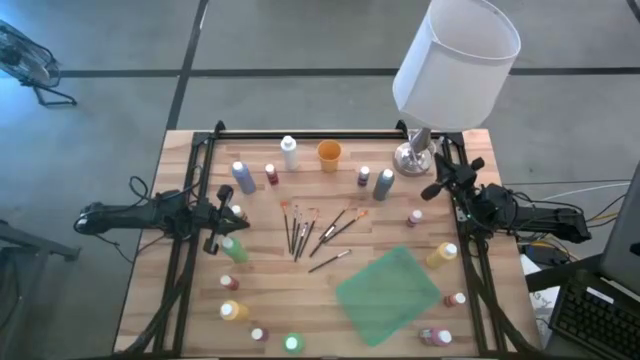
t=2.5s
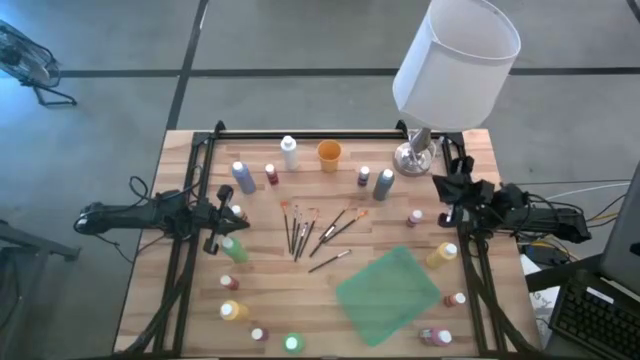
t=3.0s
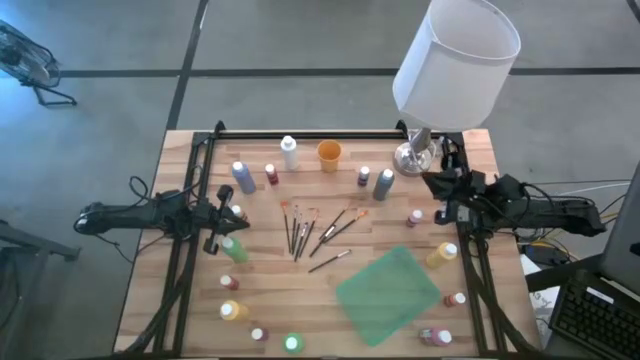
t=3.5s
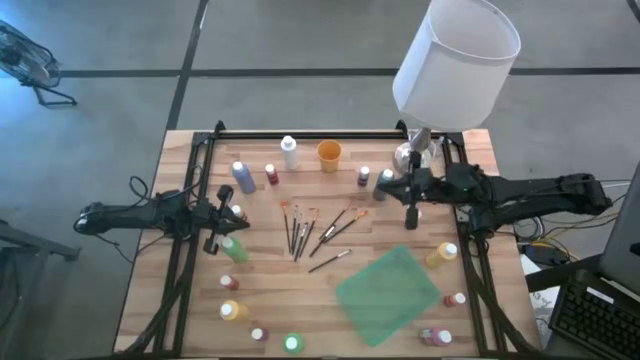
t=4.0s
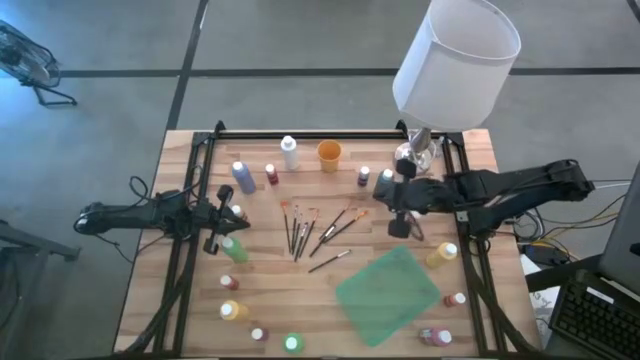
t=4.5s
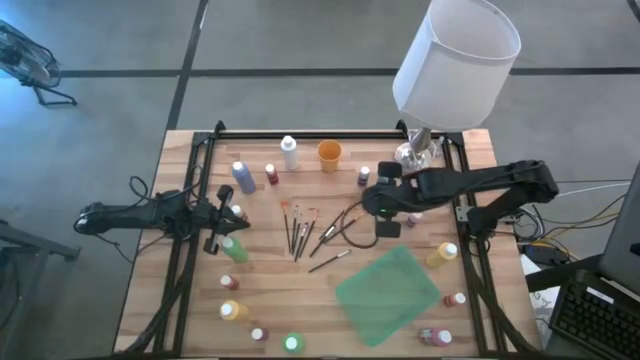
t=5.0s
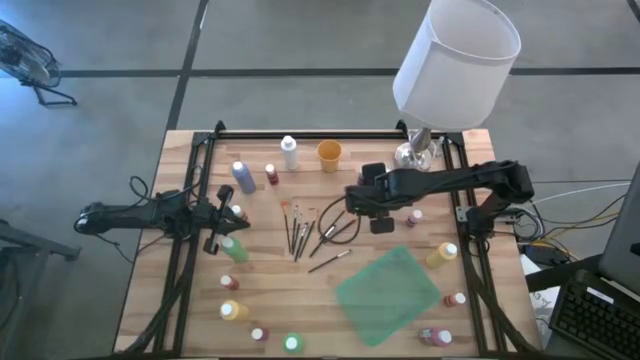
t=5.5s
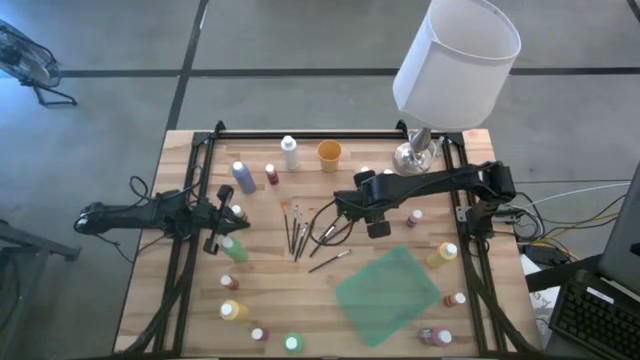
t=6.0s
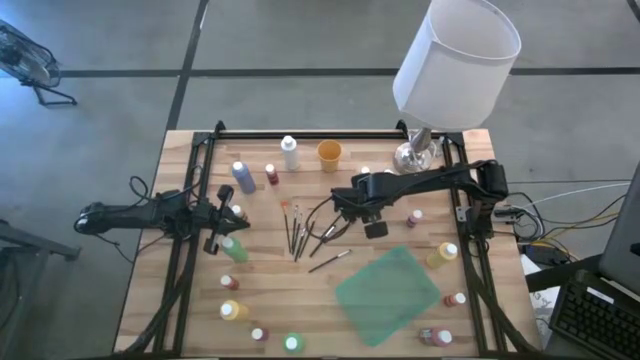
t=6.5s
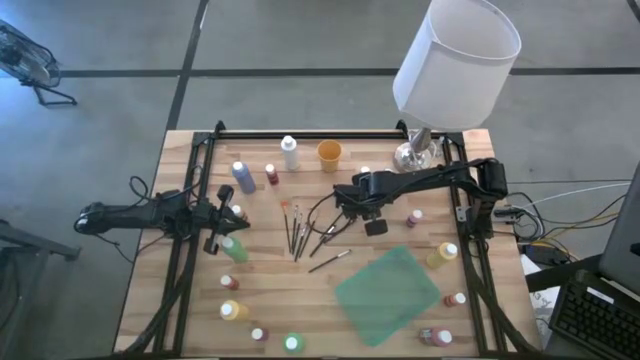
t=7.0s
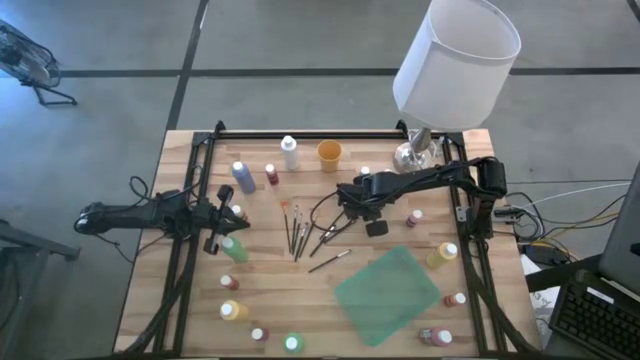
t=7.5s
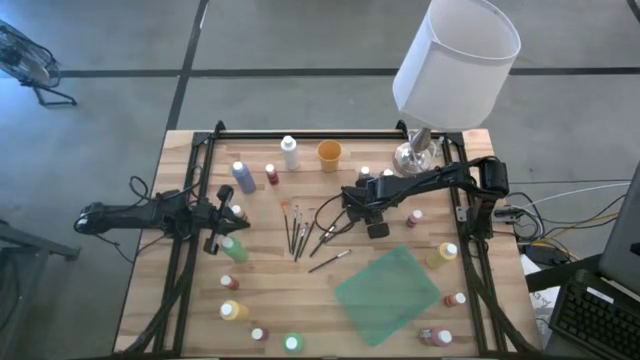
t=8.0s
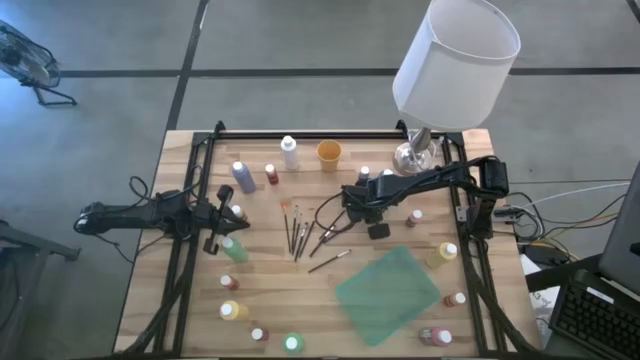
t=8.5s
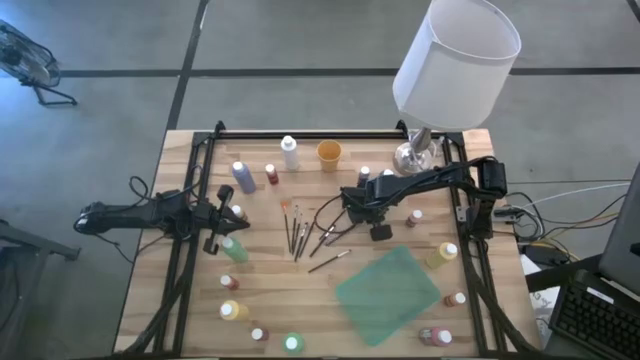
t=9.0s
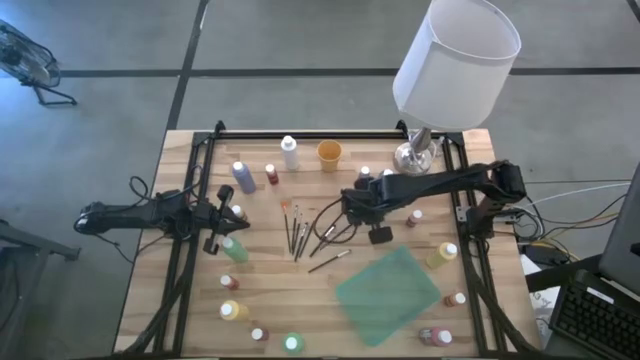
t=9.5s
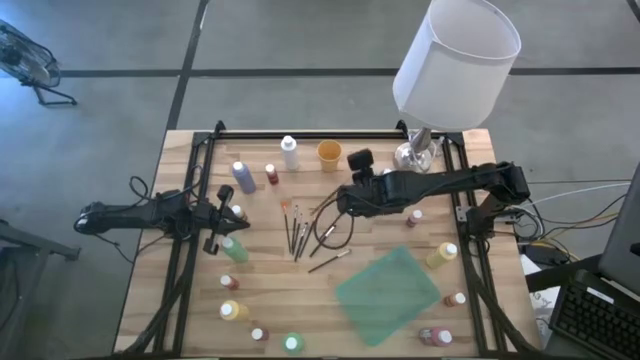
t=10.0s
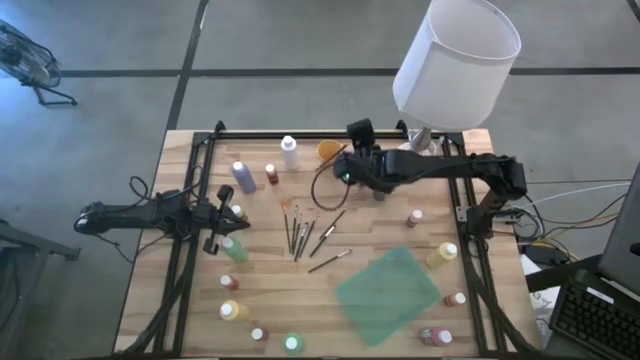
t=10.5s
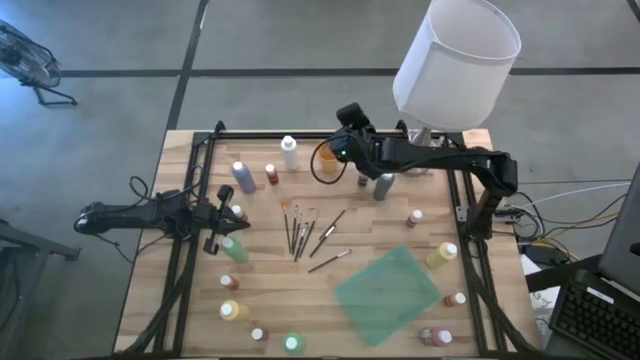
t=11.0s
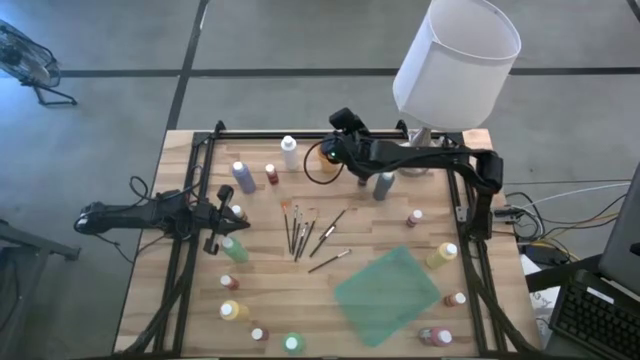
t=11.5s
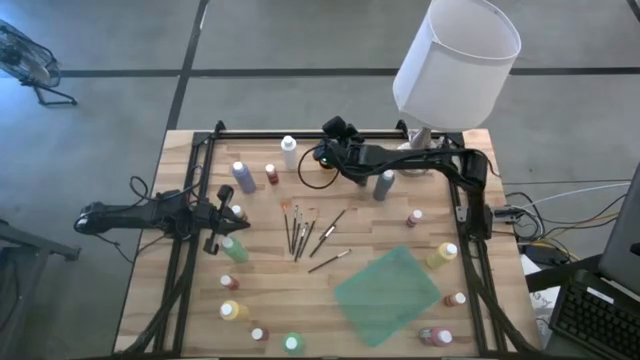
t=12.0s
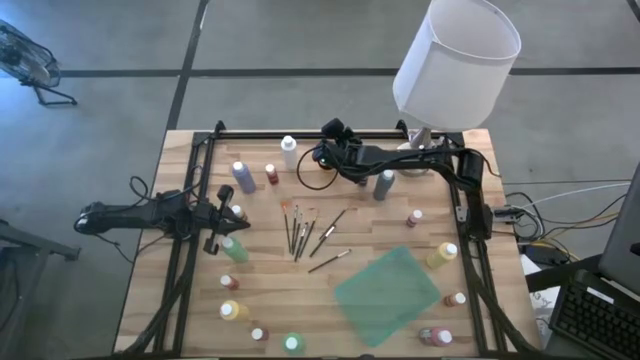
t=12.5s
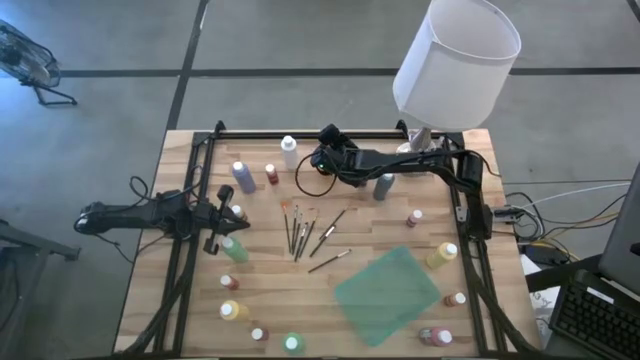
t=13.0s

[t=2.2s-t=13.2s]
Task: Pick & Place Paint Supplies
Put the gold paintbrush into the yellow cup

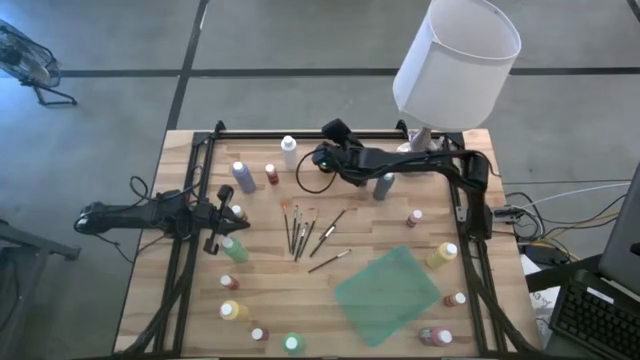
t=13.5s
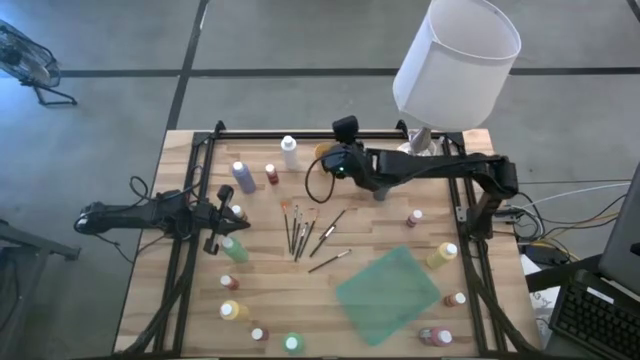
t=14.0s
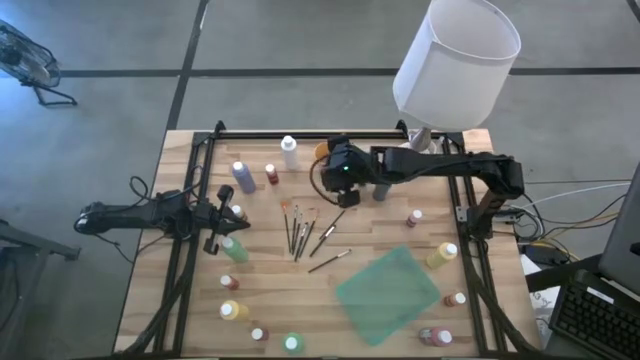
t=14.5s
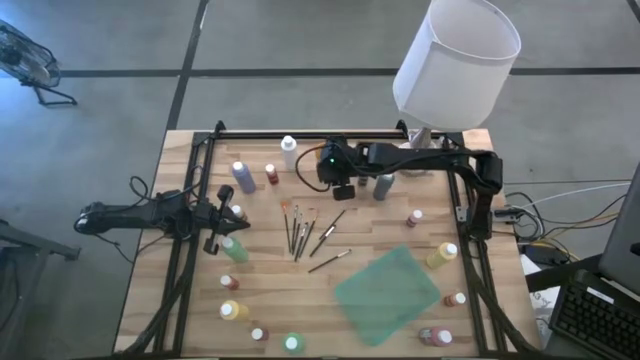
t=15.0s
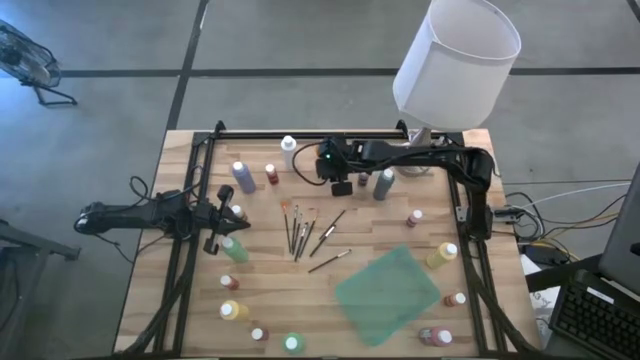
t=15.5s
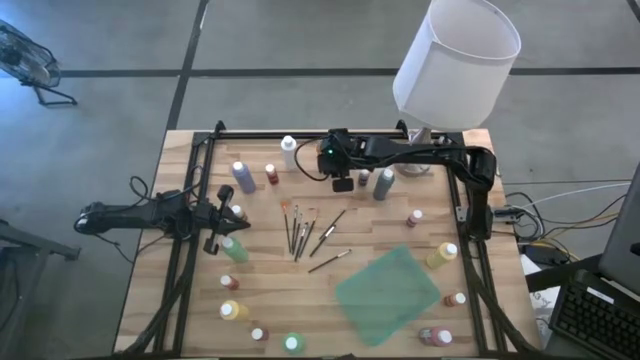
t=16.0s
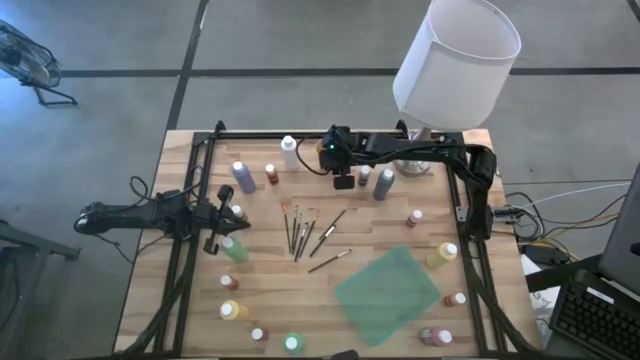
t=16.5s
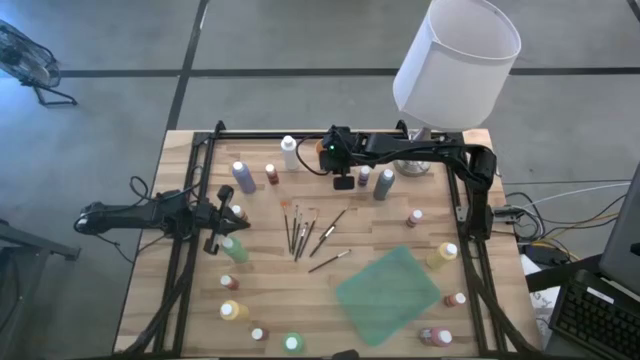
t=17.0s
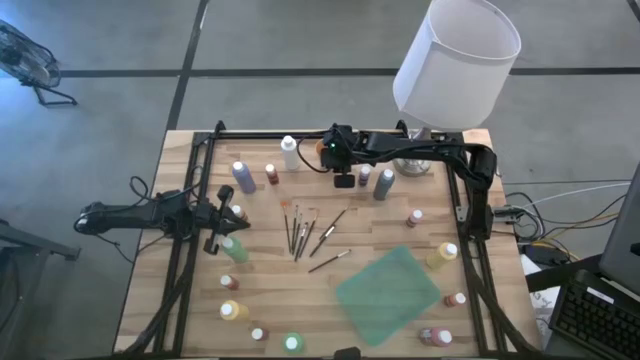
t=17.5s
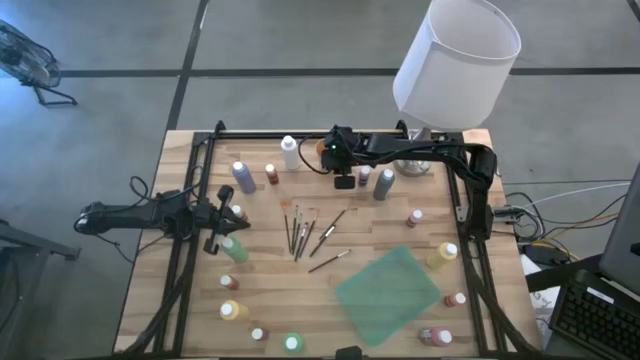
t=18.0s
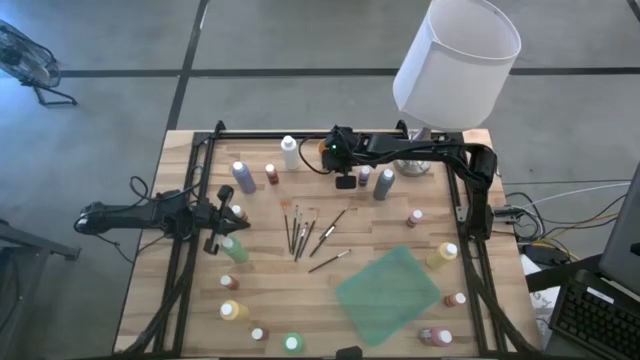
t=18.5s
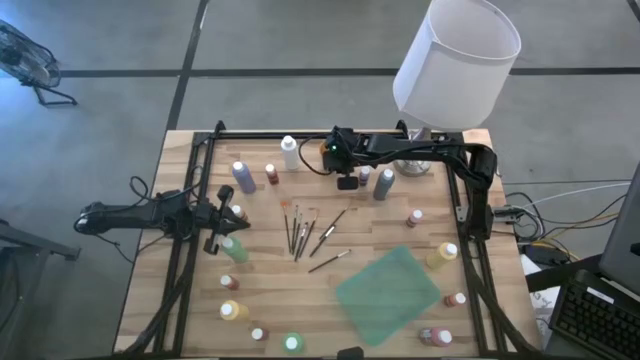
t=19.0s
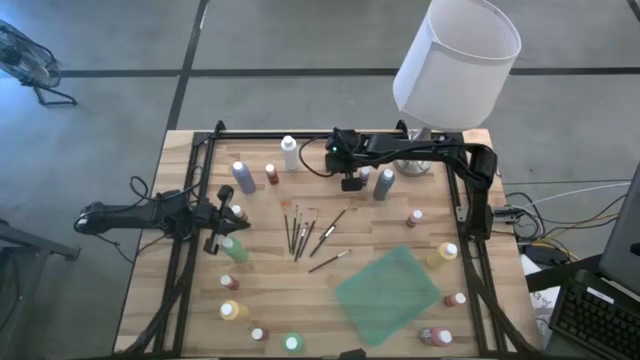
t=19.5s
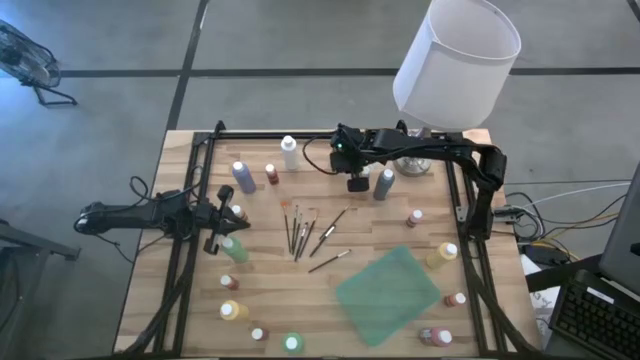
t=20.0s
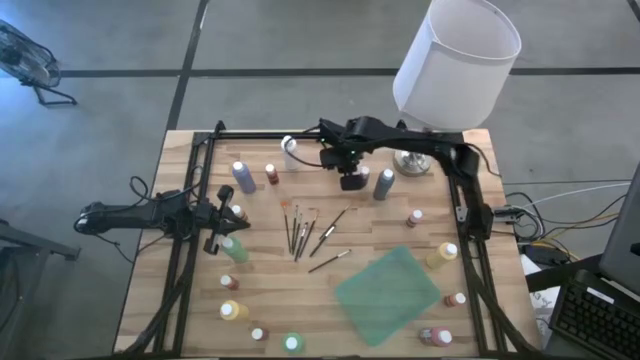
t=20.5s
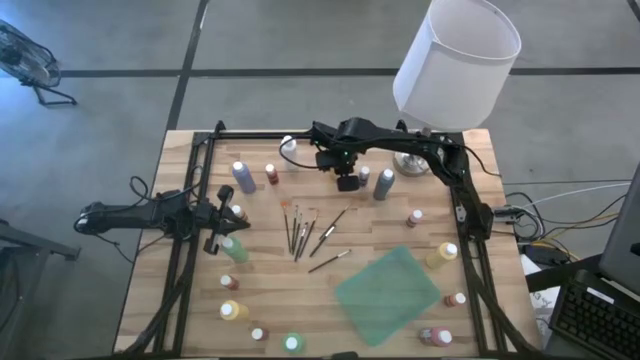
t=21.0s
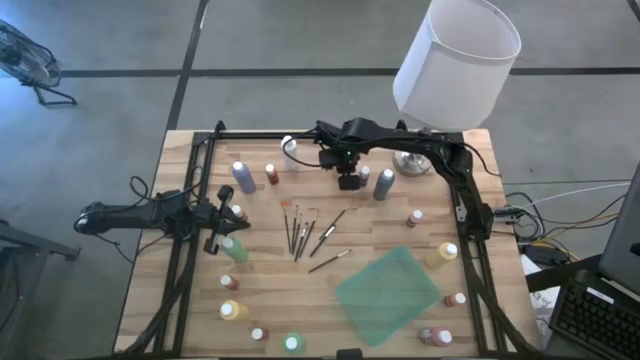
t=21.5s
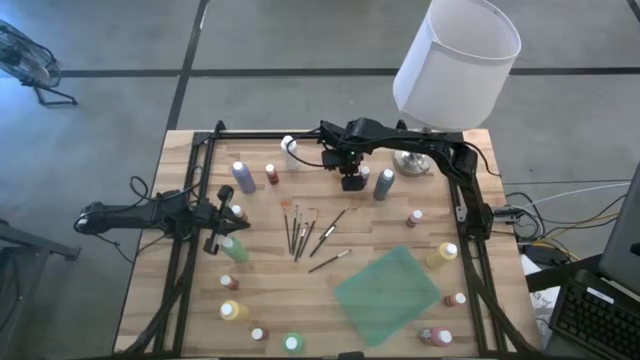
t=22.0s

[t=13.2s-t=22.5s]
Adjust the yellow cup

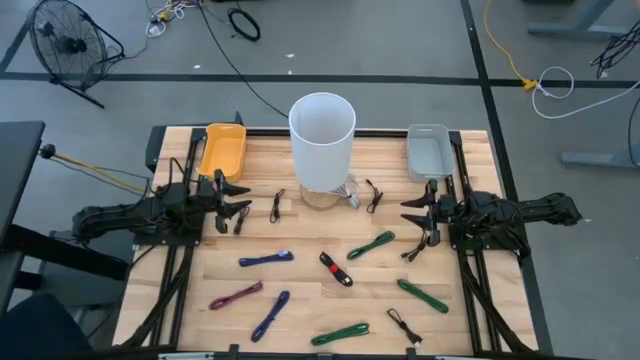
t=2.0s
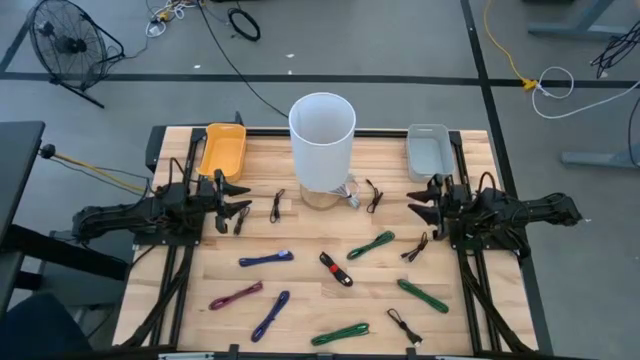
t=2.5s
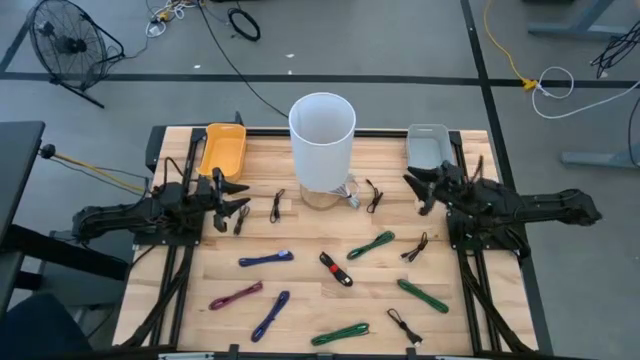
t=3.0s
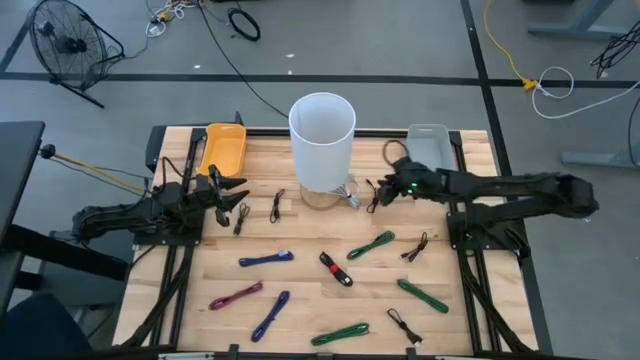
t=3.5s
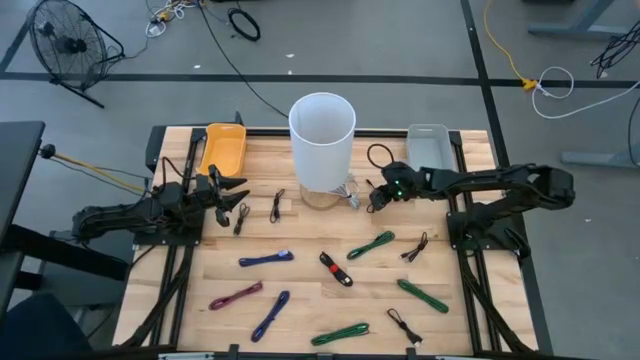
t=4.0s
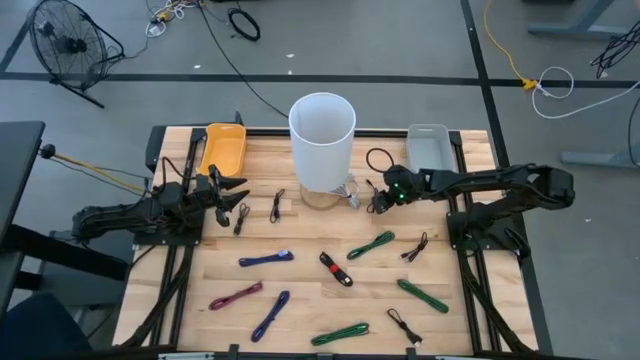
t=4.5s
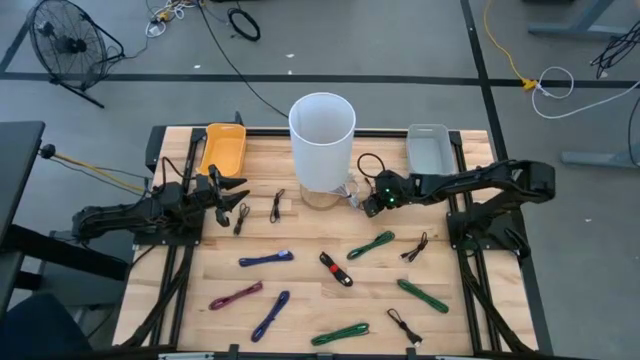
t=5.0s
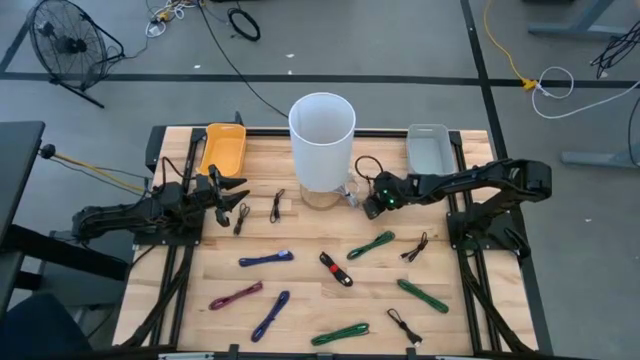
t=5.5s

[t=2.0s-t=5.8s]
Task: Pick & Place USB Port
Put the black USB cable into the gray bin
